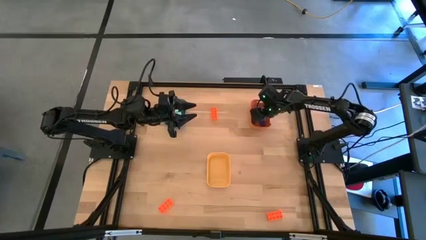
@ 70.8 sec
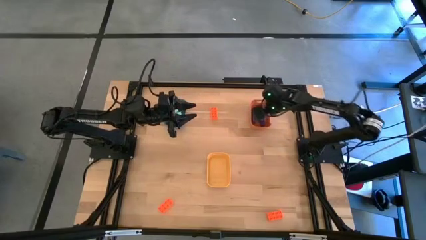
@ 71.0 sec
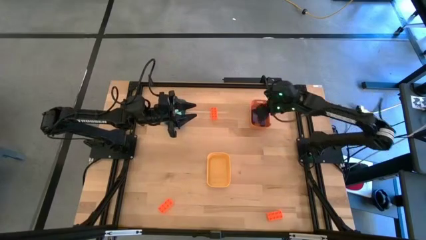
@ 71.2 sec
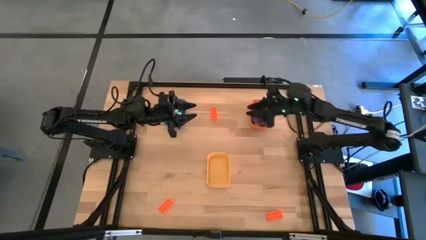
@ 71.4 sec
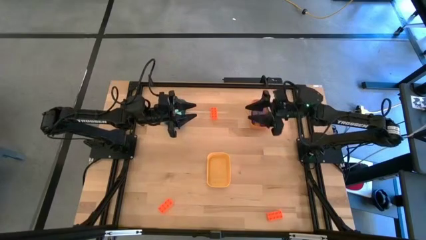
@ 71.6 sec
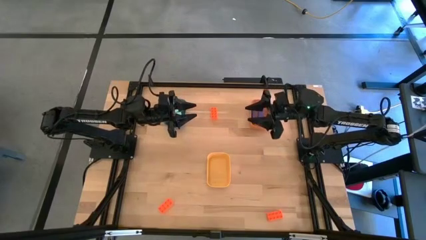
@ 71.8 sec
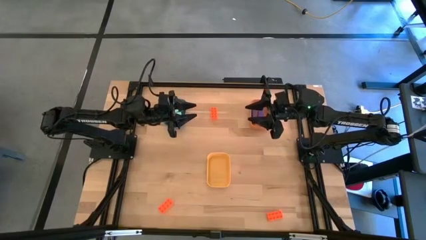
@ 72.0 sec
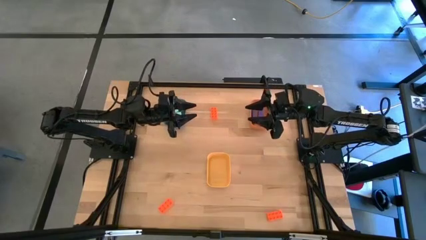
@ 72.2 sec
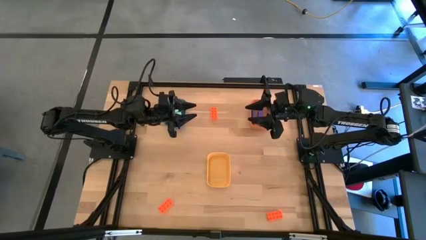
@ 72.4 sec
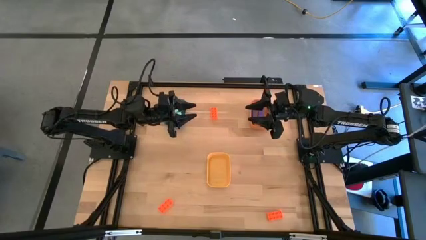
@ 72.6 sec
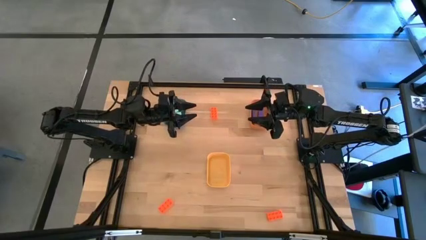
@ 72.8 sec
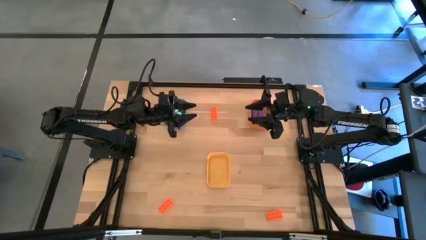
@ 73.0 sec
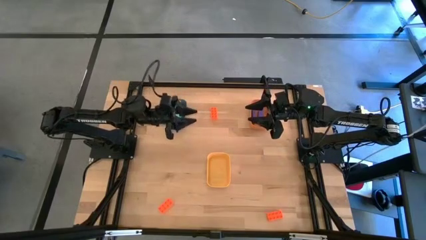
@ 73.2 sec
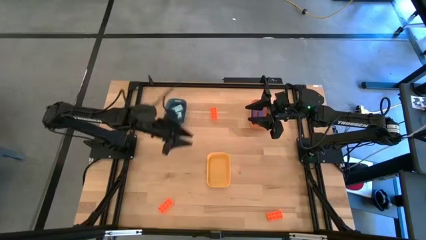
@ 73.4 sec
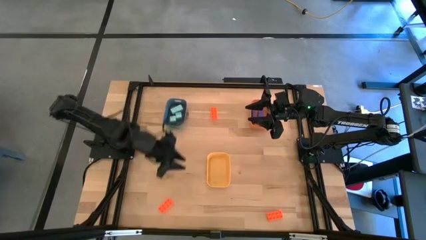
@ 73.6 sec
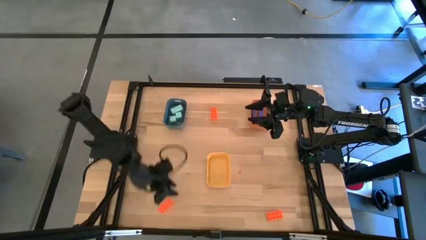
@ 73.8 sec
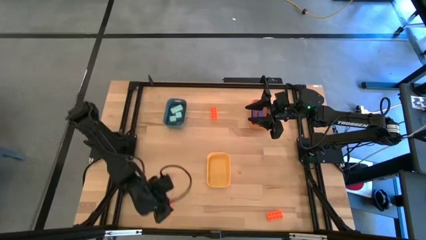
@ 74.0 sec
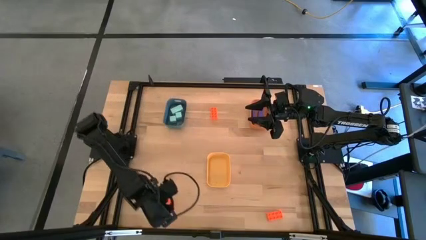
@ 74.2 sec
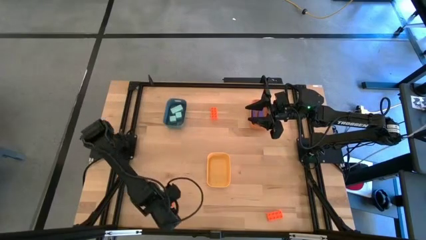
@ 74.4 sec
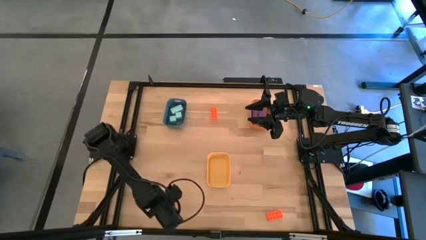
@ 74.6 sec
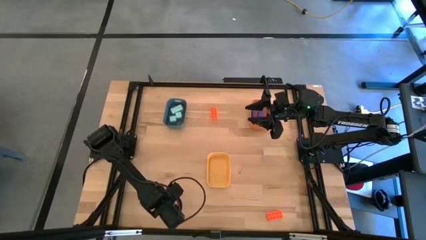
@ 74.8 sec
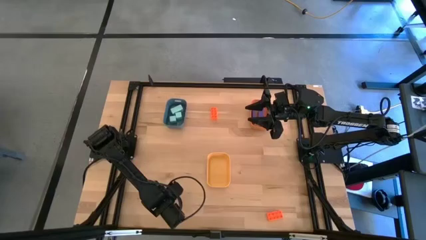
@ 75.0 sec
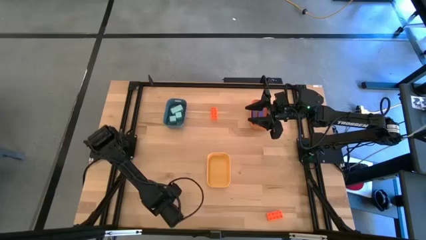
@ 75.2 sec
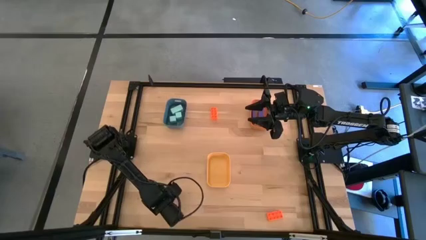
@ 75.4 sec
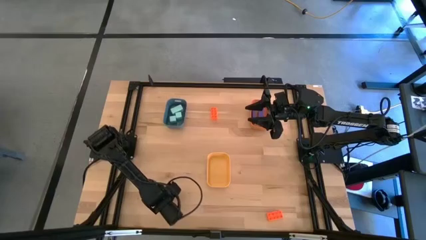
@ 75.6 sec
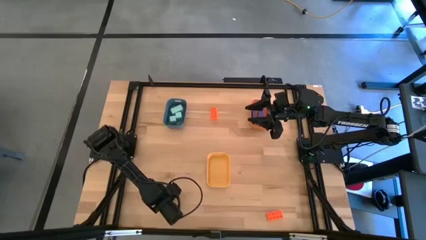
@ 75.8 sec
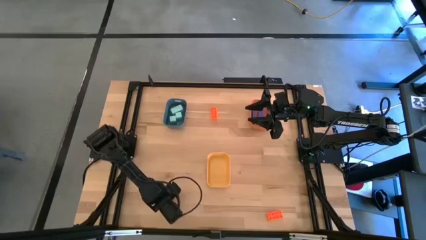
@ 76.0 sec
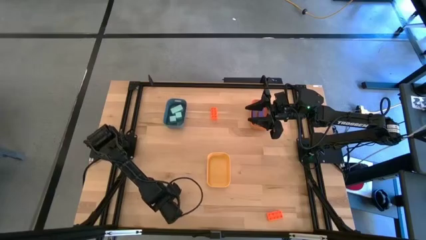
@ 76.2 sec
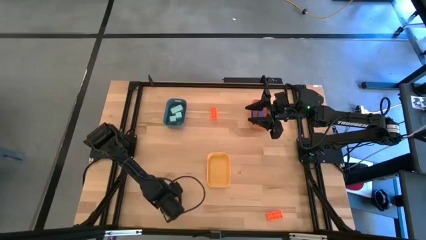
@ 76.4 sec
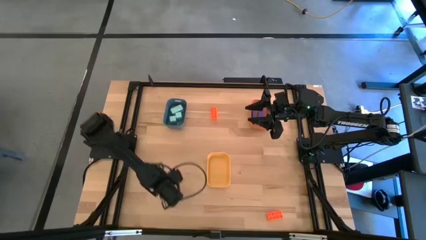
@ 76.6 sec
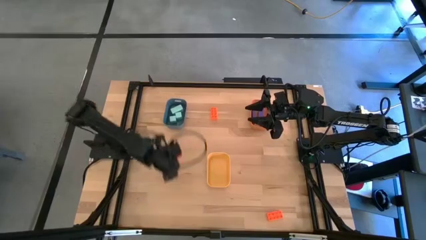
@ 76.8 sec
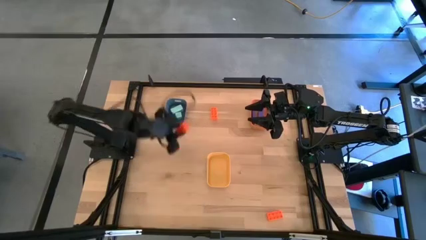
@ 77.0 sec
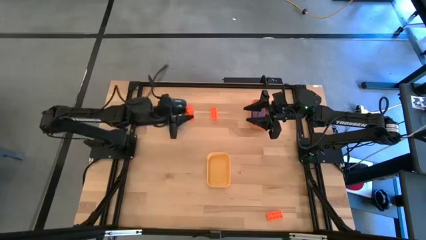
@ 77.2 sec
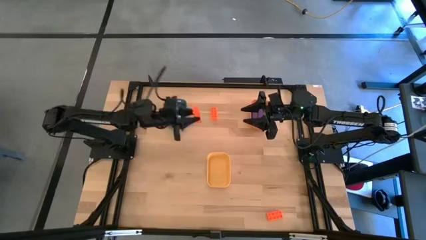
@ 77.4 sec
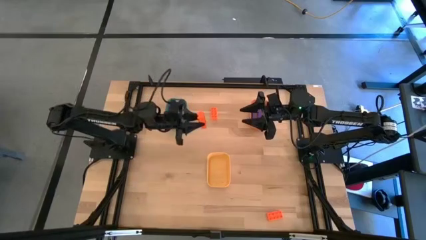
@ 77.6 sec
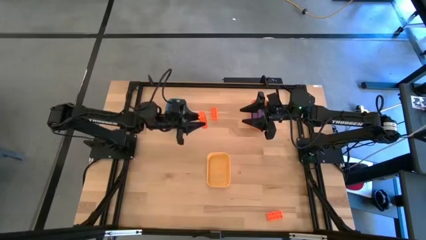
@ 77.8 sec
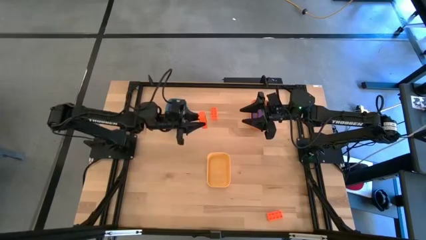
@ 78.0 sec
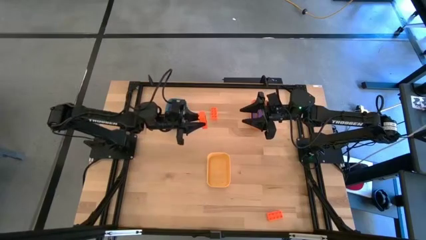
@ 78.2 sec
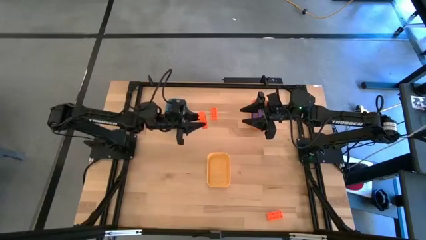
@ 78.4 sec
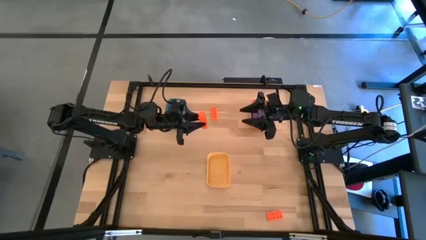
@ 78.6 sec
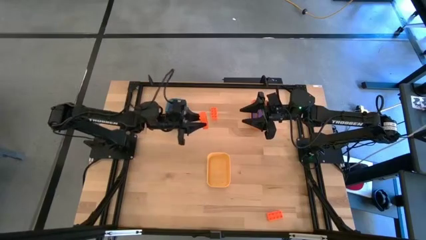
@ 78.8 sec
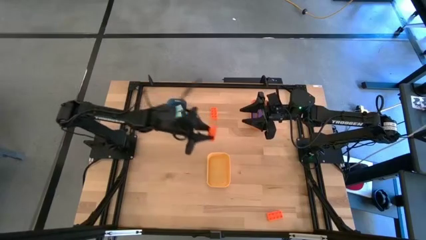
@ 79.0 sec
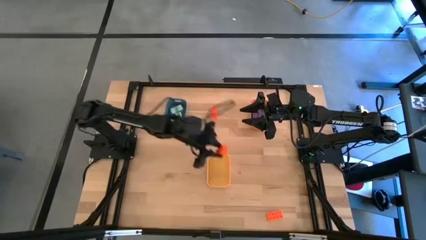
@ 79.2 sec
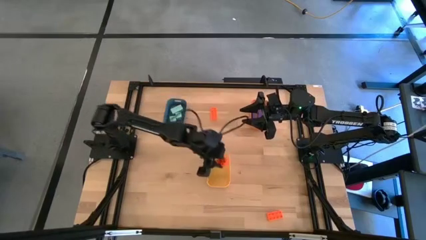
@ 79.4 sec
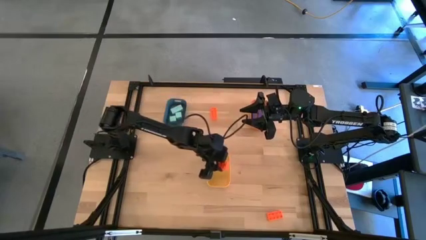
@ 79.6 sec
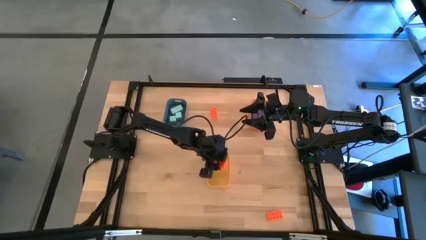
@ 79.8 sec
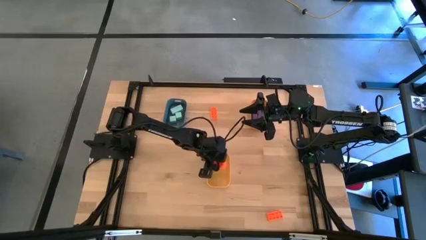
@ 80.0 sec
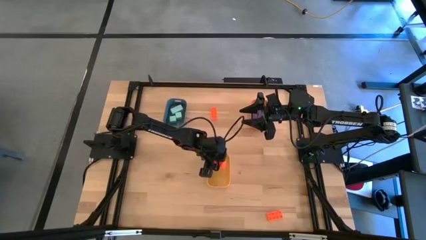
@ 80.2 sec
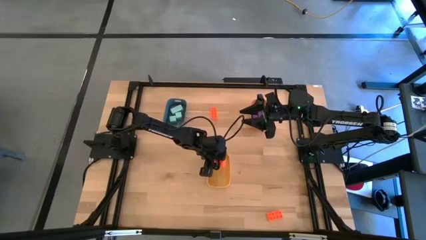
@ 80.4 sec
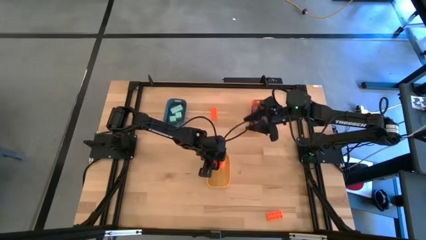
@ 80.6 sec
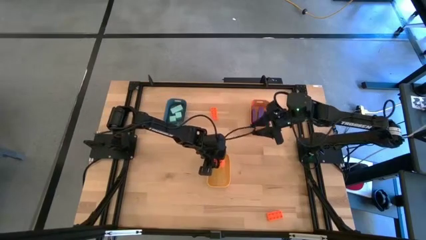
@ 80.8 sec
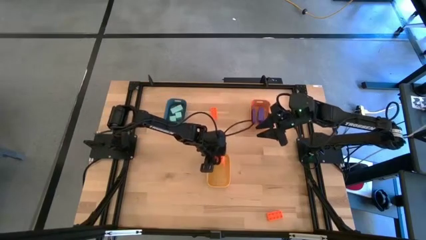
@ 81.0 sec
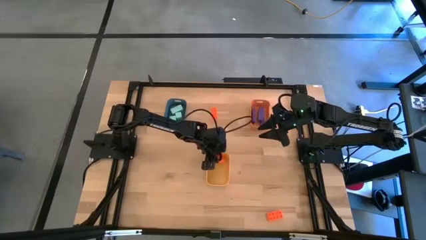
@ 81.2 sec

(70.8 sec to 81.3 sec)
Task: Sort & place blocks by color
Put the bottom left orange game piece into the yellow bin

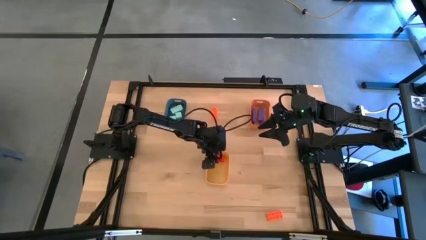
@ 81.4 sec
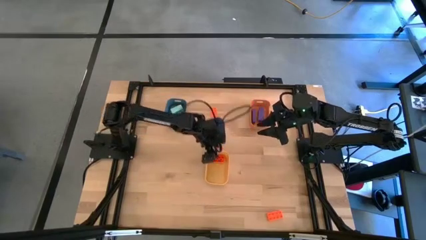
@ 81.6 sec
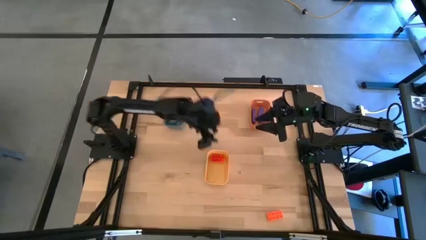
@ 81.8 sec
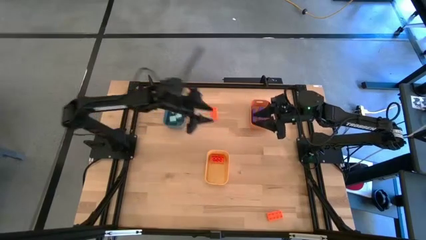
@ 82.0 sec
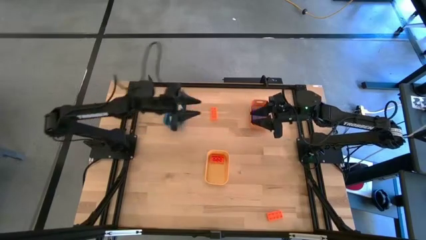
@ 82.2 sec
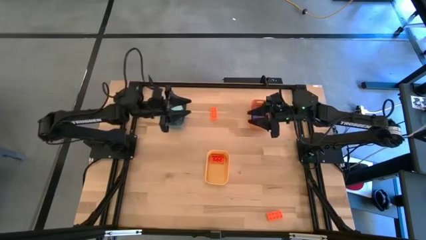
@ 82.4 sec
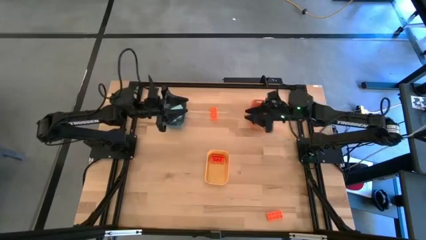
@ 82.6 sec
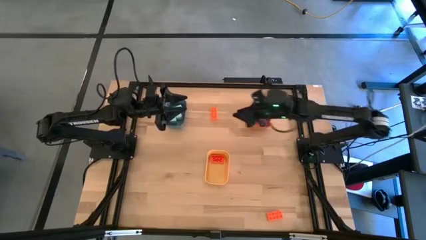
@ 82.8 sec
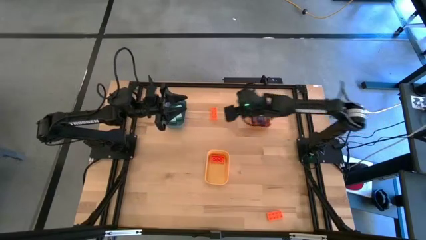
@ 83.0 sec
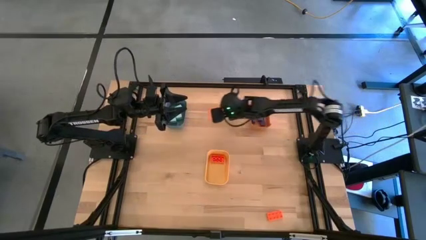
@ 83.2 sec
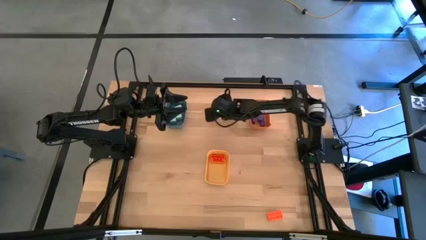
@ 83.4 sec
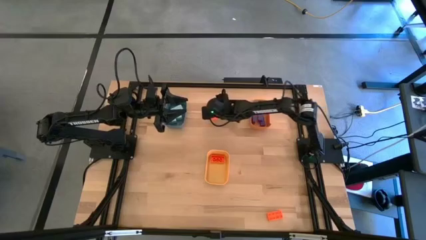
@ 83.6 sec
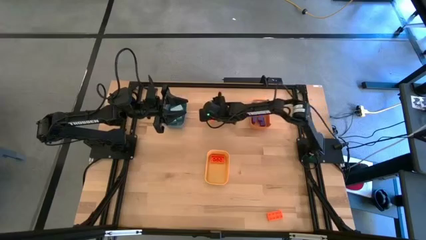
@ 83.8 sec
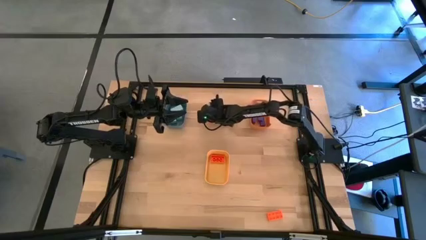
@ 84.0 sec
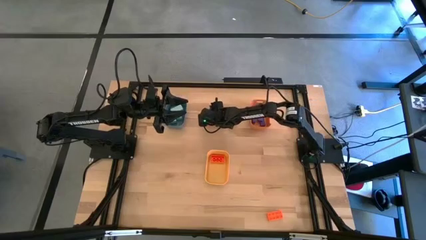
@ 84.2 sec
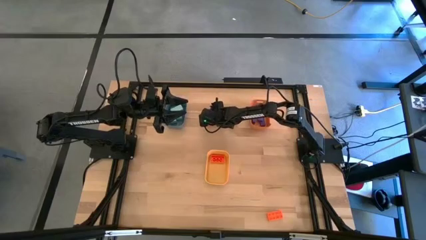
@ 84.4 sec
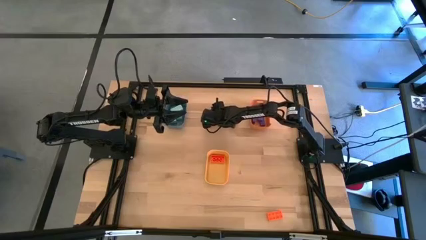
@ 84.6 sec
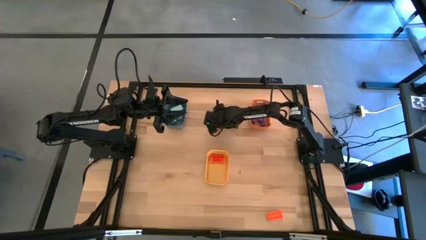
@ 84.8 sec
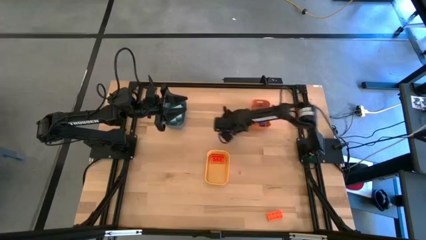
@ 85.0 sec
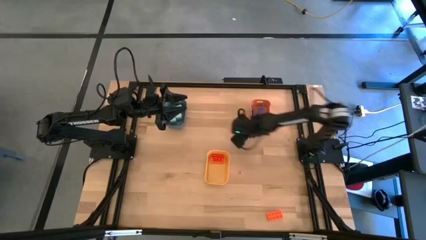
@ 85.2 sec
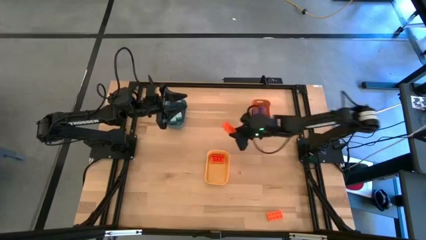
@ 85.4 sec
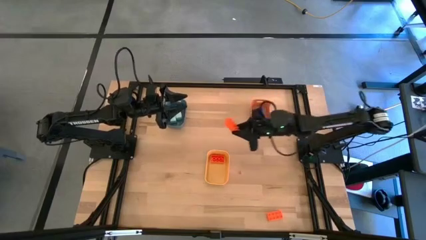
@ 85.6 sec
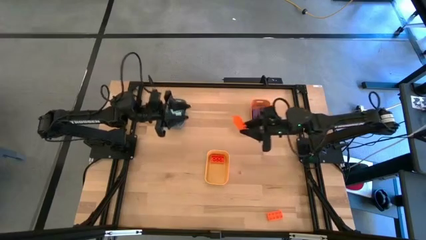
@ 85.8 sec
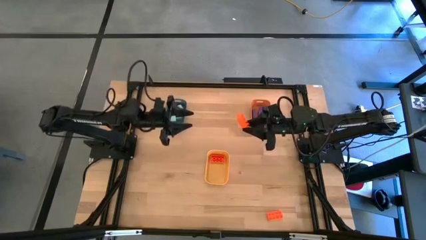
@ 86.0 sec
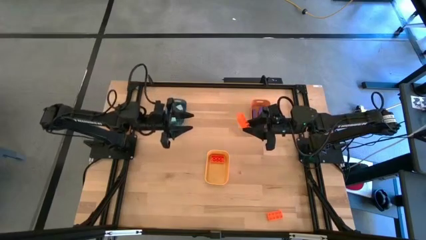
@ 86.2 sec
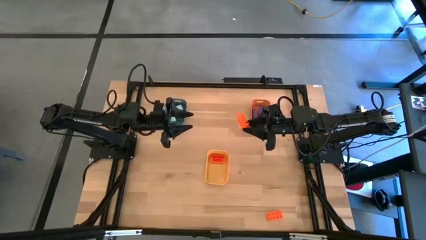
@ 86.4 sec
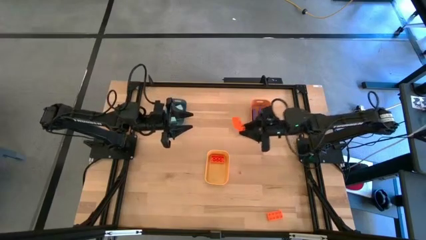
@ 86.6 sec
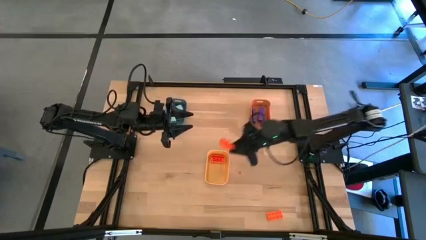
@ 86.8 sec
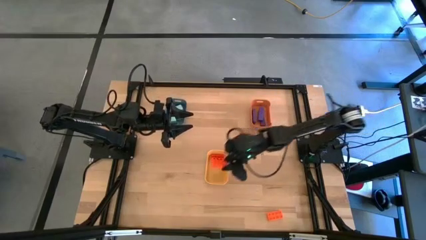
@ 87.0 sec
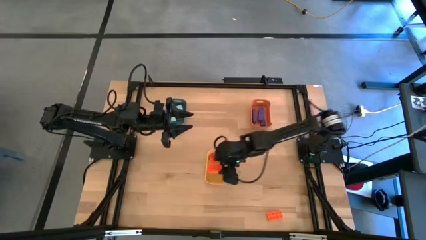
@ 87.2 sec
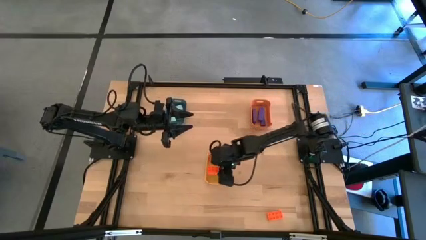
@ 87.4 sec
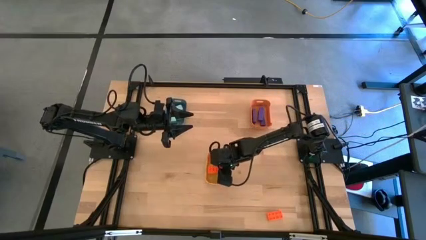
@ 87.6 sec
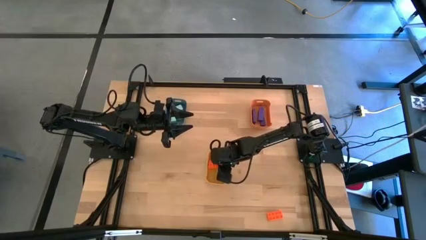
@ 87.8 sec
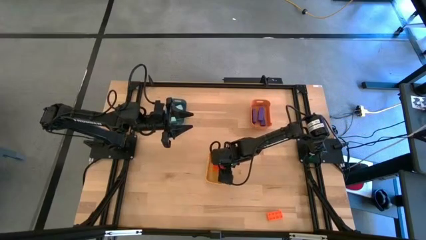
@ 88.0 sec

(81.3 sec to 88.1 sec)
Put the top orange game piece into the yellow bin
